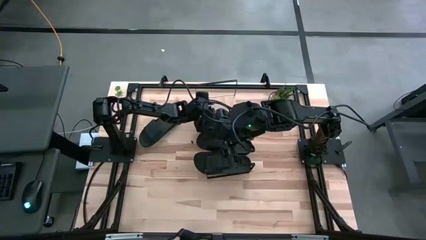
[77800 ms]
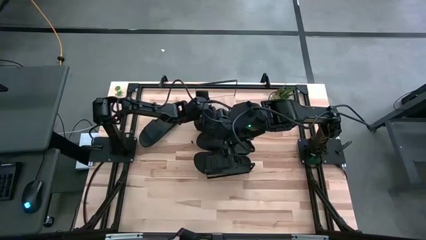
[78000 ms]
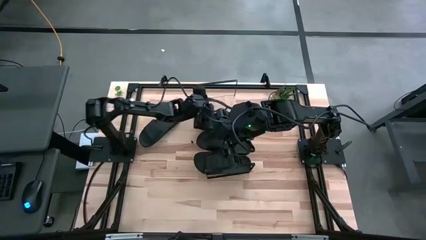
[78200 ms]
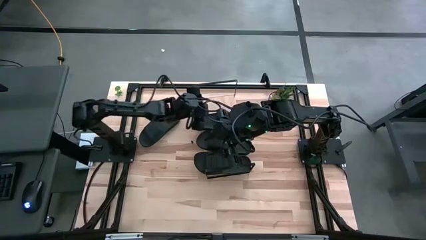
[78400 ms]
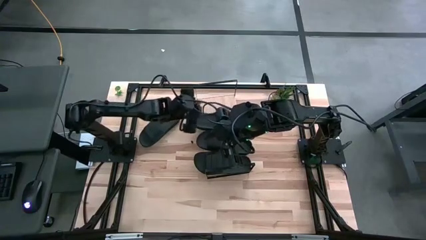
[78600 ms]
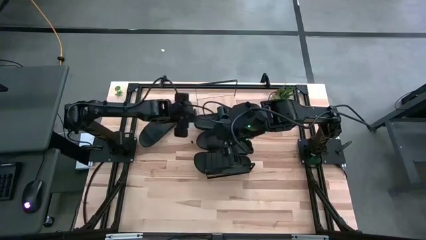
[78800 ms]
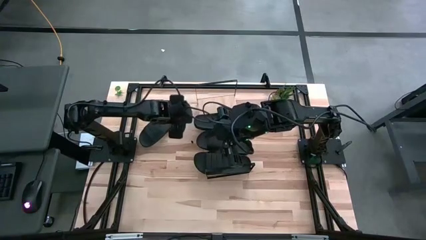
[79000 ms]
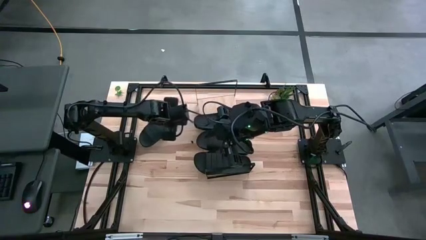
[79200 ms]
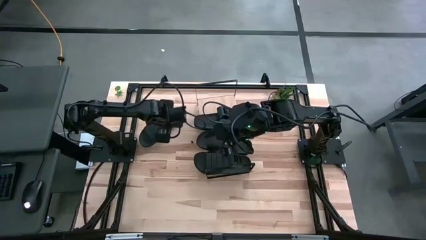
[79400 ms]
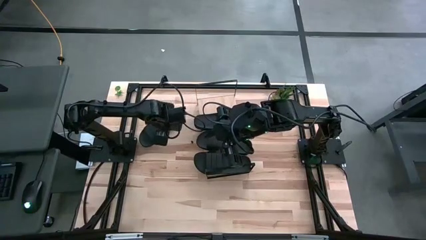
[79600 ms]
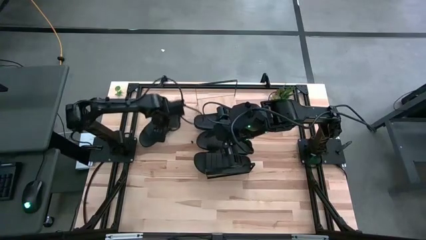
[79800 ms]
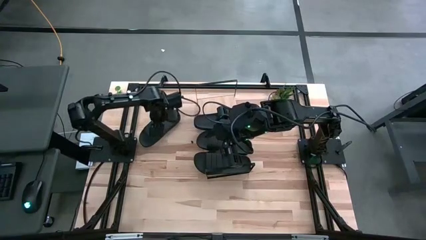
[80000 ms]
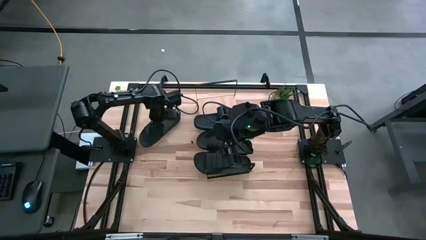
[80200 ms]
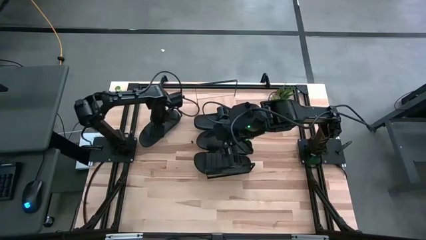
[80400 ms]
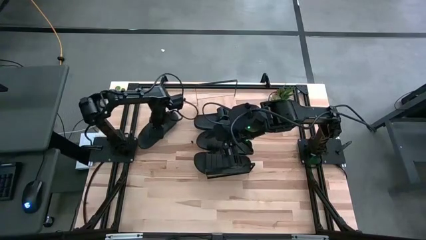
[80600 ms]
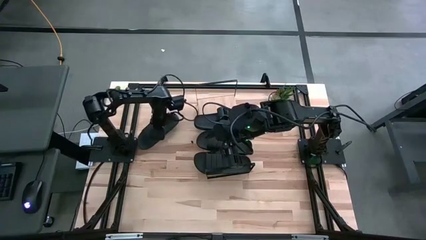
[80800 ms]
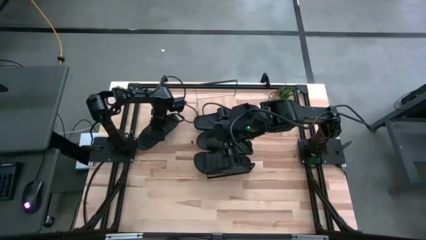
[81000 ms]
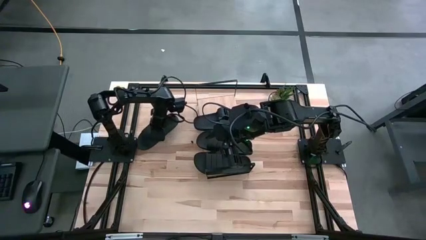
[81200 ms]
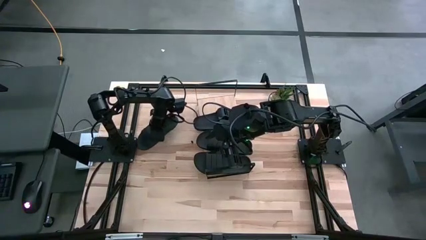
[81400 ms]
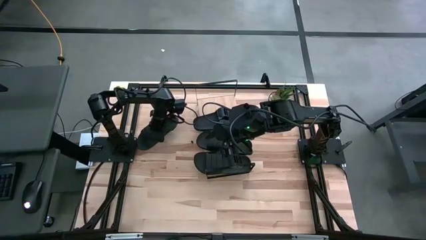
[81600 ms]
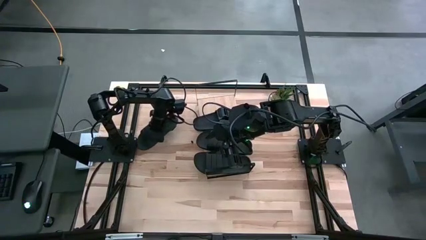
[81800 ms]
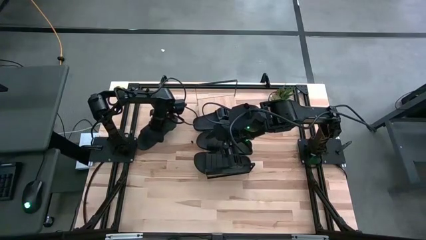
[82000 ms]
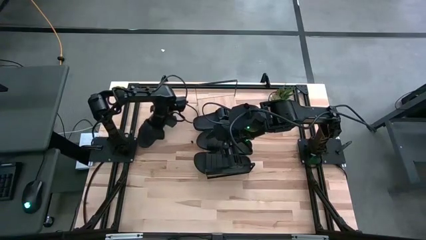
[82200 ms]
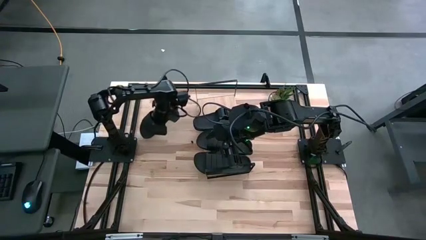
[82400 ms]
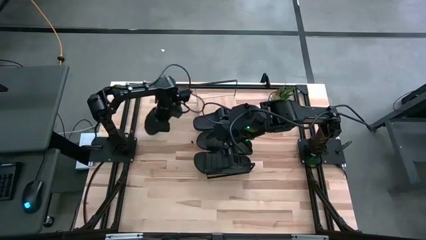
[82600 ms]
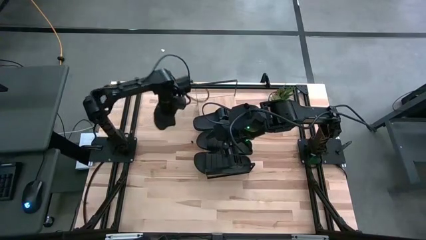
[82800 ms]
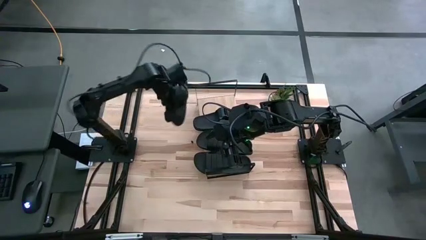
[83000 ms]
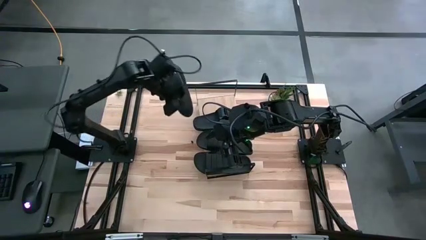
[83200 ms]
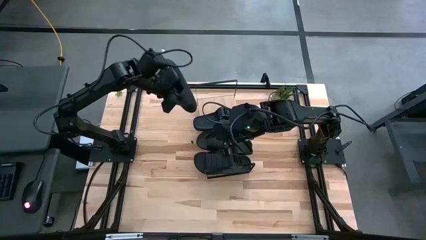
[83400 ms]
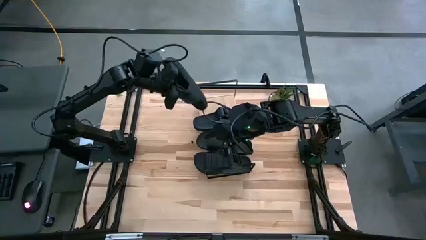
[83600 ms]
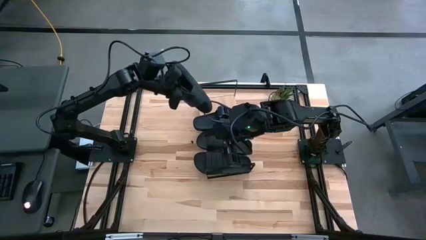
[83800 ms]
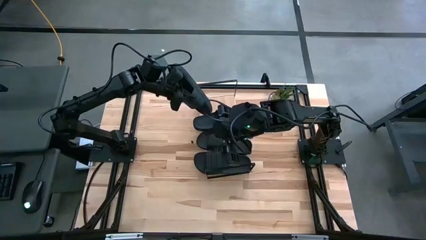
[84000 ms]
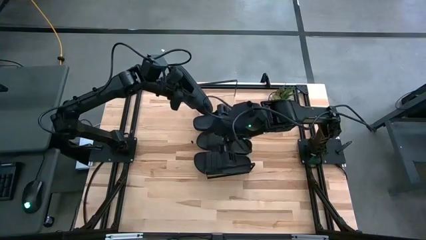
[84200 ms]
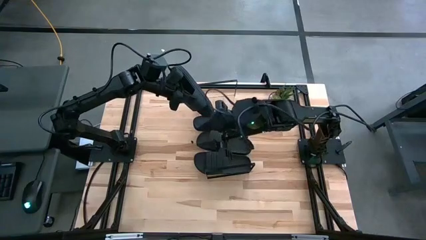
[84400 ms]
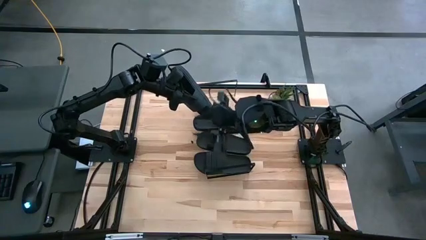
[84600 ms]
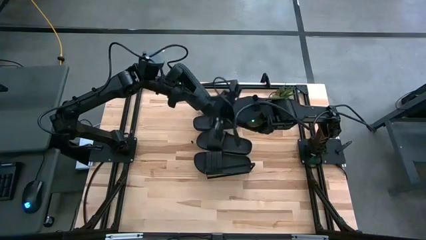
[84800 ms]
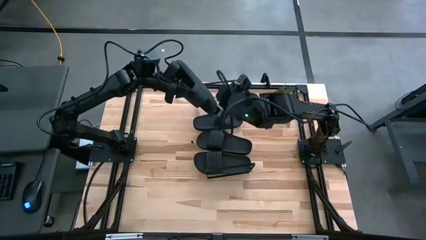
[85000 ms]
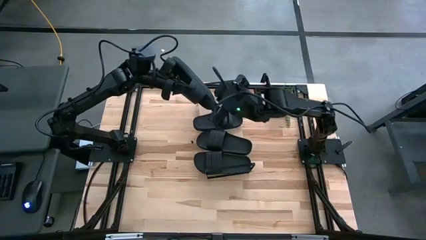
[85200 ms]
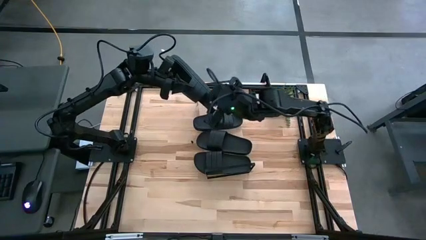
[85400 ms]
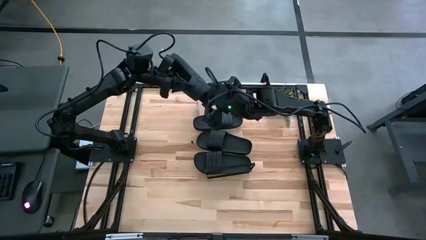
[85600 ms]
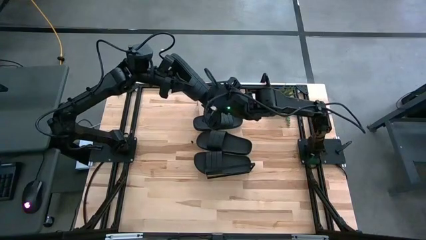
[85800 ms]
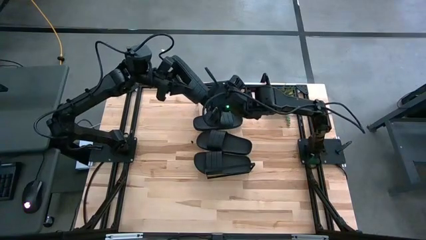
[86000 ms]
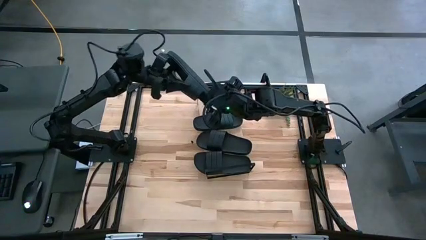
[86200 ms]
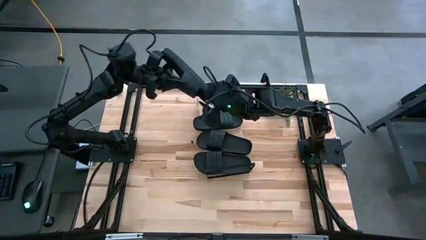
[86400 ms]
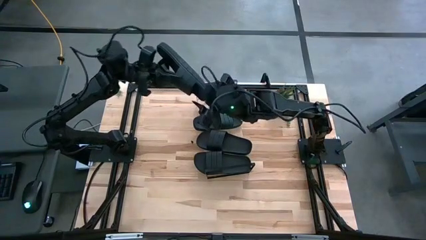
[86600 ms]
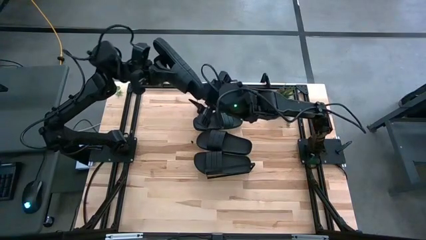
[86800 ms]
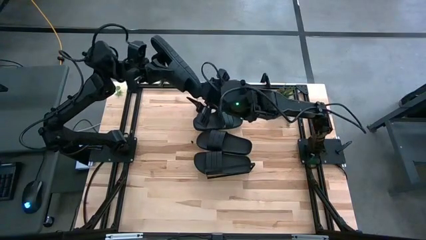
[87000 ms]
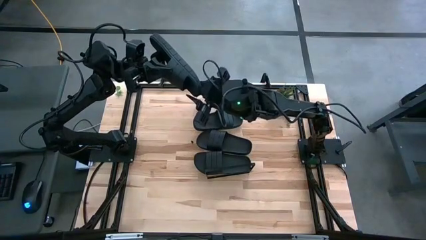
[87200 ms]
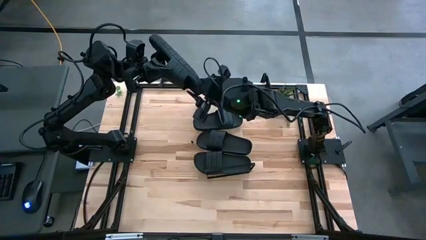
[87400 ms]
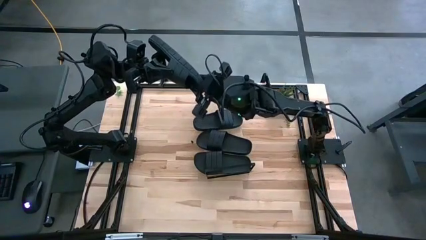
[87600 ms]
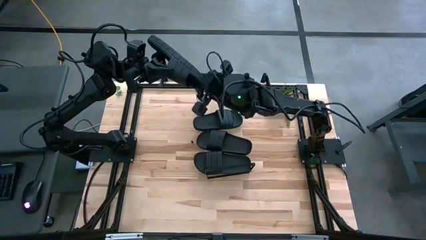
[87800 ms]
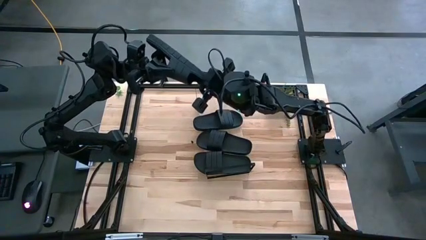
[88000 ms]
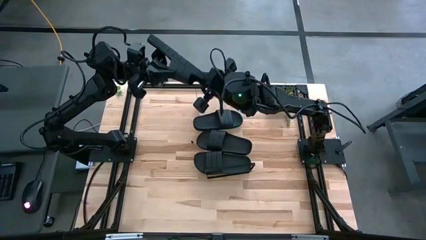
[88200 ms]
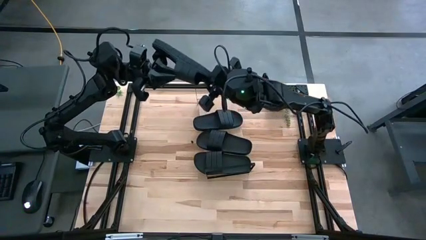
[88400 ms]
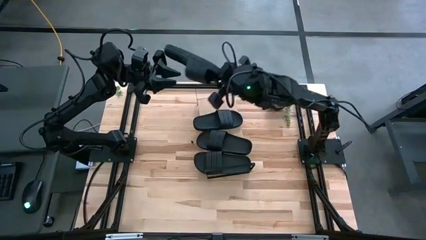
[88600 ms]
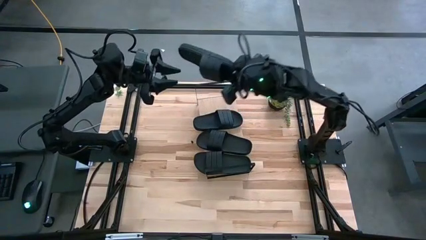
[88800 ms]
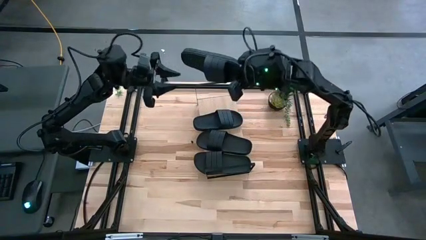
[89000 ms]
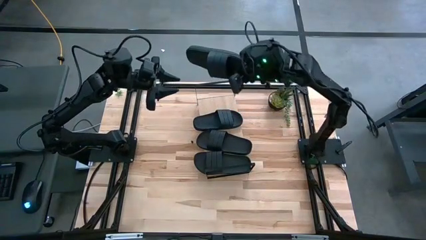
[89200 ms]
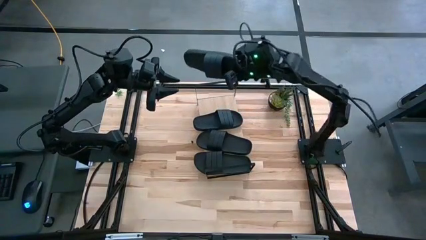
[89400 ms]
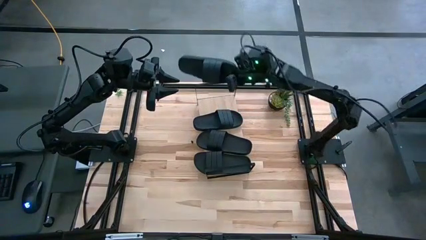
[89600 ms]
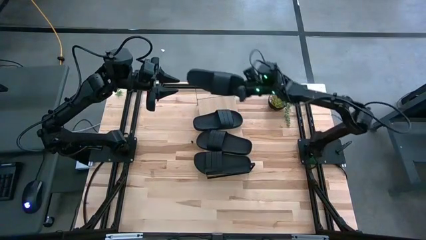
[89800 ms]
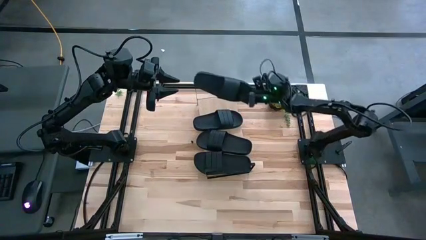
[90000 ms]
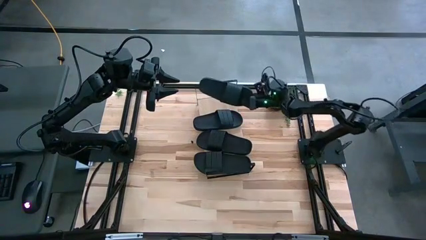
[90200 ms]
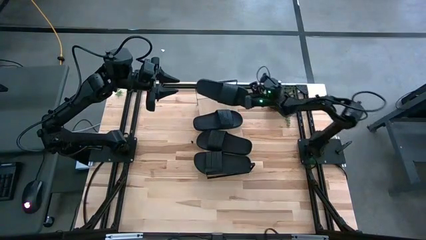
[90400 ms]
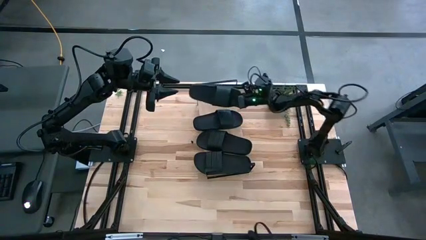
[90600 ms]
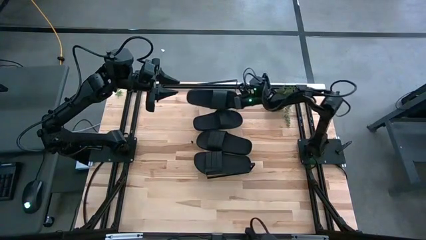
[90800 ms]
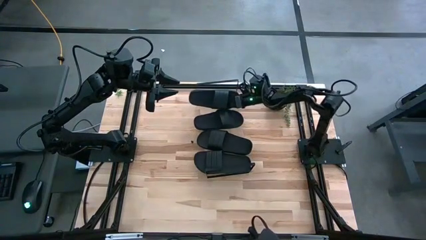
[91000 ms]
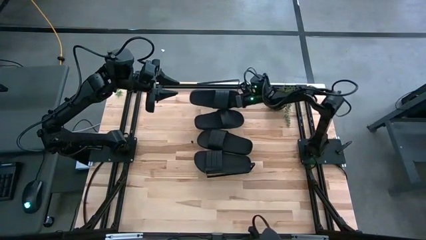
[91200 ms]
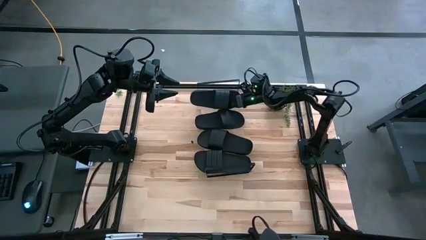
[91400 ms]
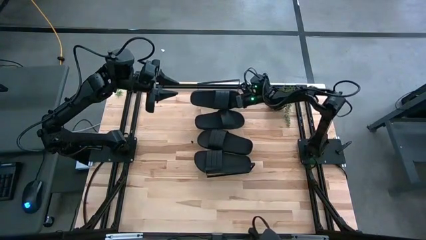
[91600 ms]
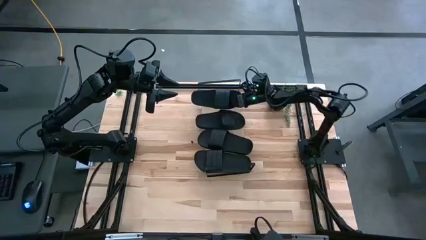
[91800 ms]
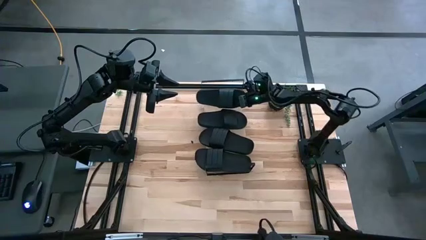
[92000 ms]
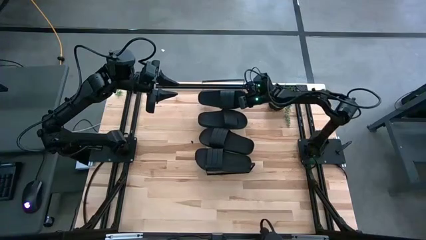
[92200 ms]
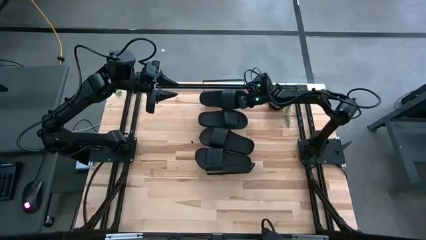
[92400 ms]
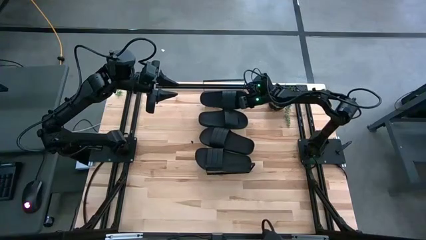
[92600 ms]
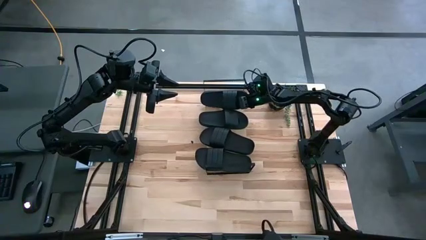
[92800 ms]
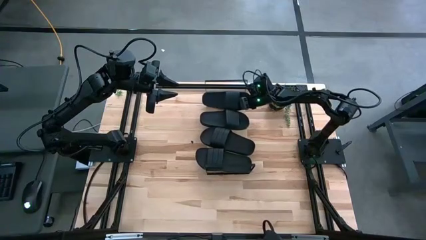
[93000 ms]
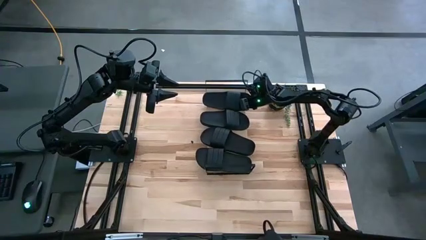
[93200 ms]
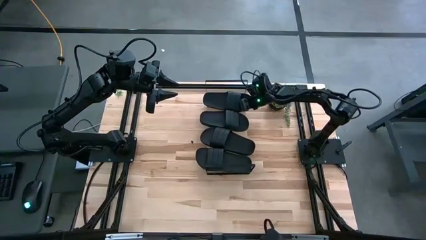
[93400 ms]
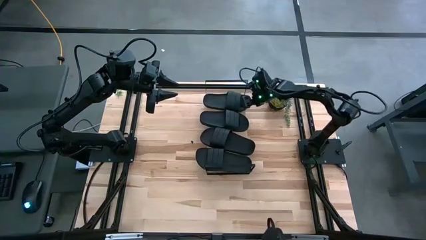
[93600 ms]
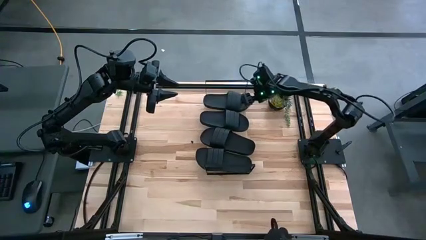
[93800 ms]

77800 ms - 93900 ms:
Task: Pick and place slides into the shelf
Put the black slipper on the shelf
